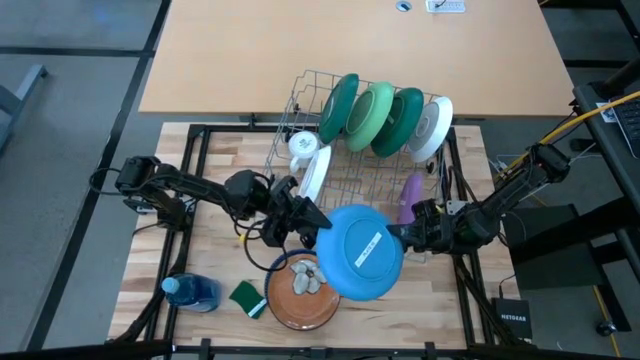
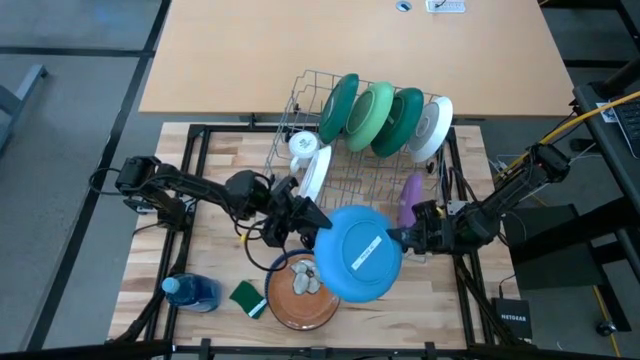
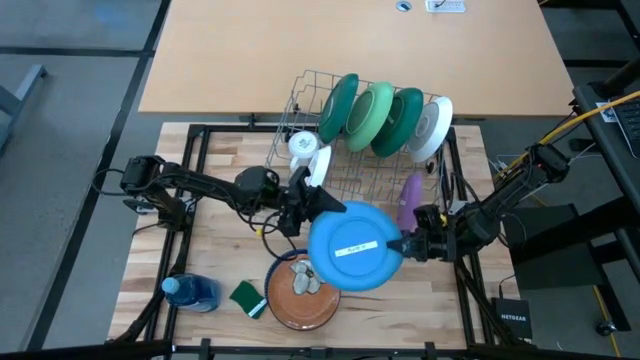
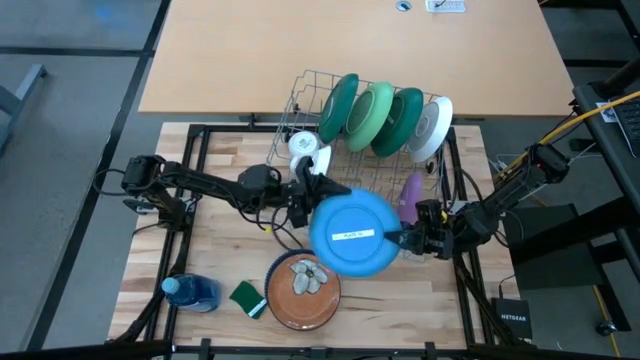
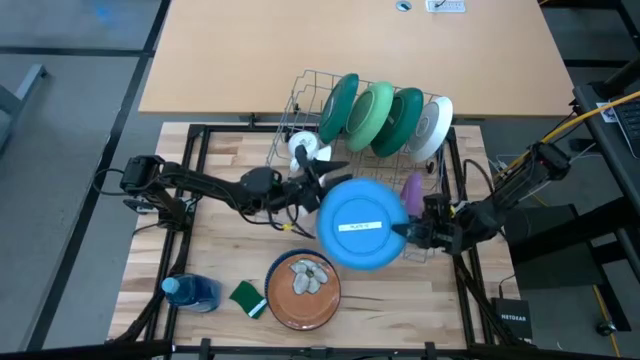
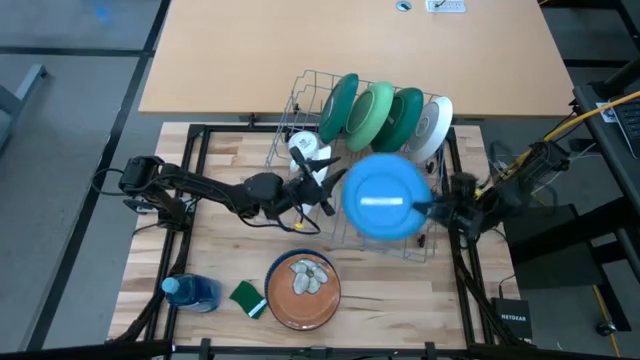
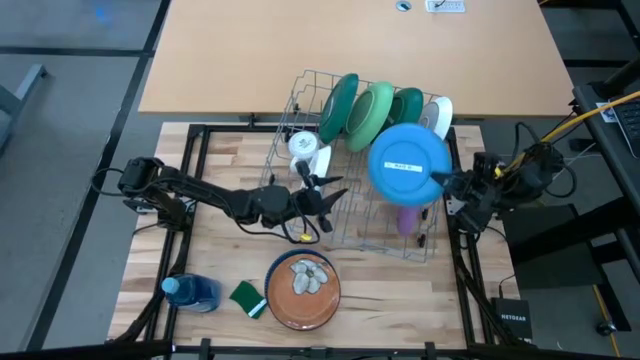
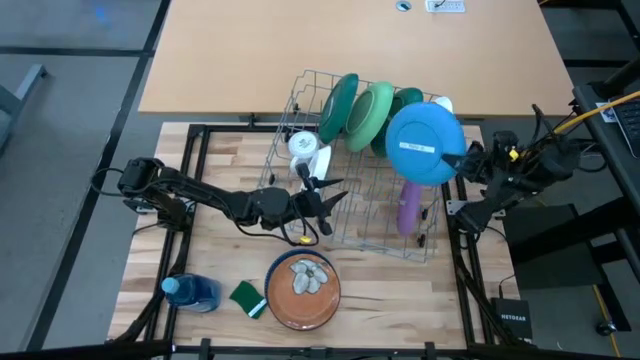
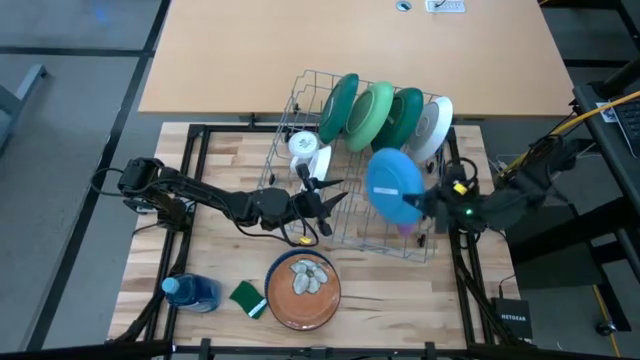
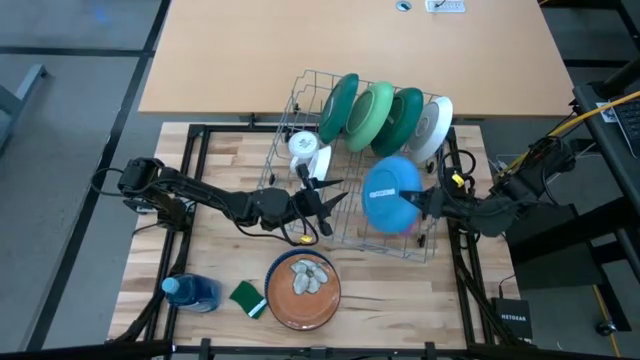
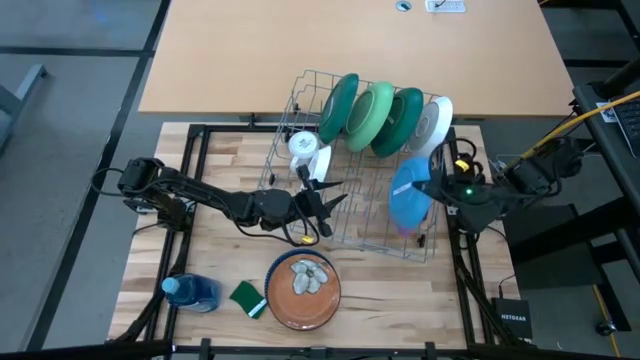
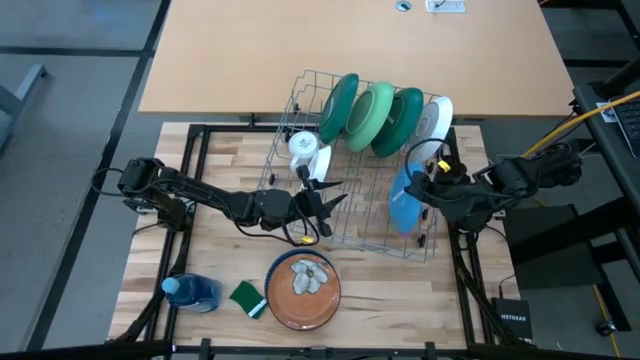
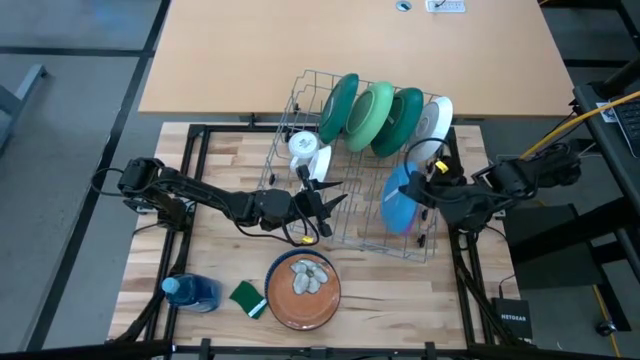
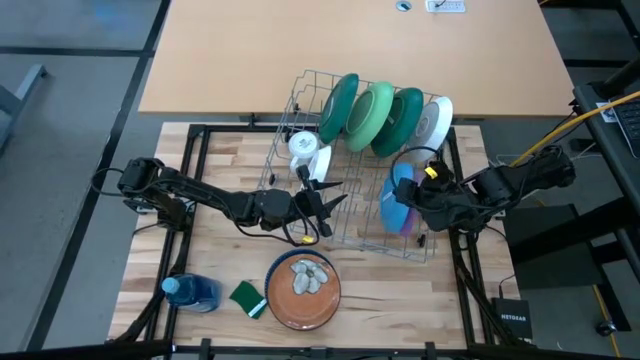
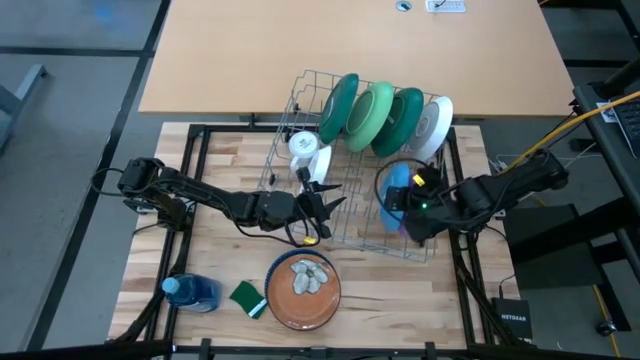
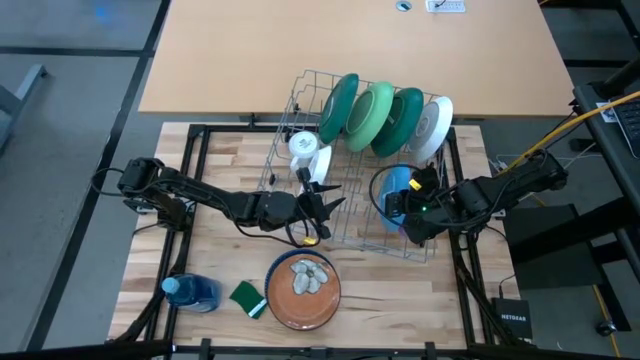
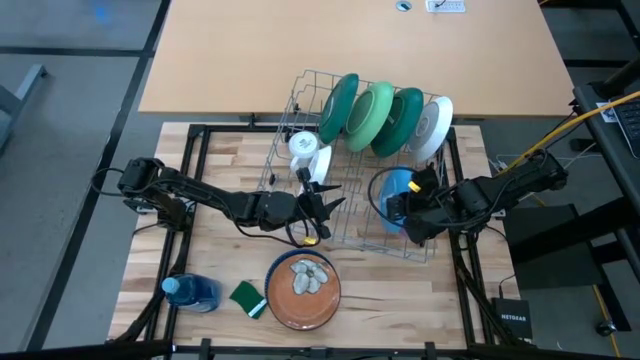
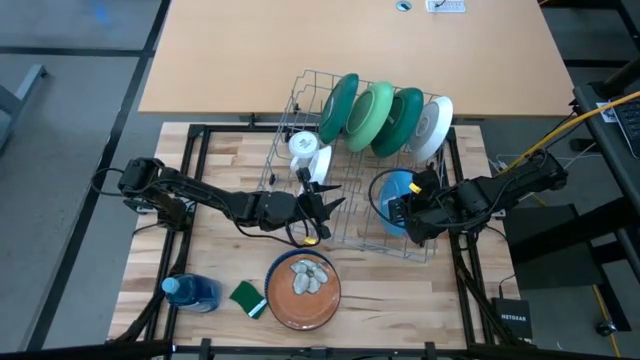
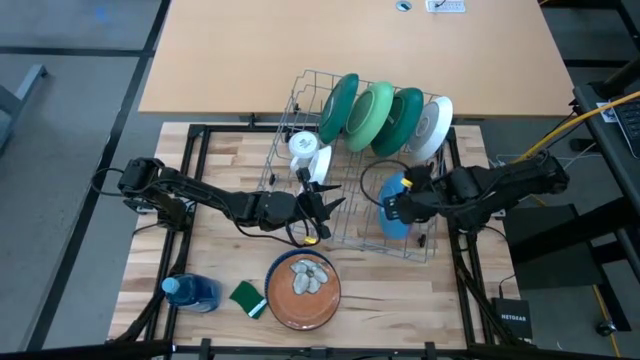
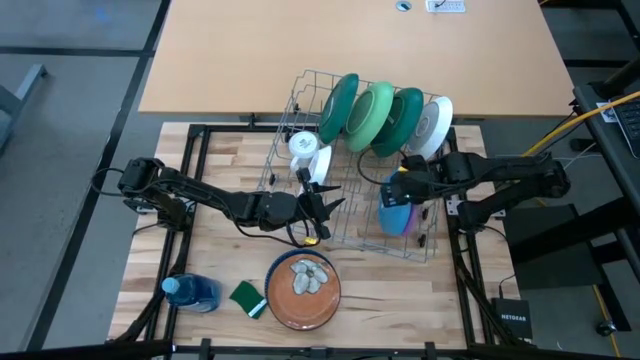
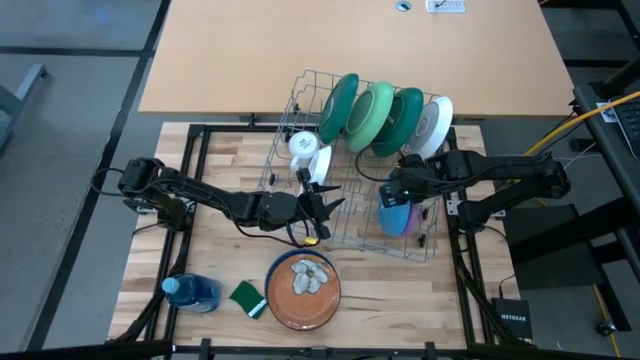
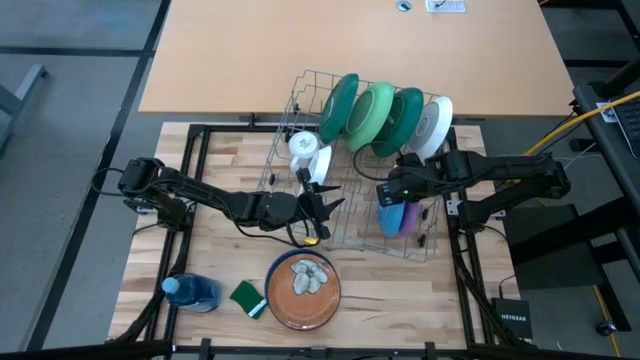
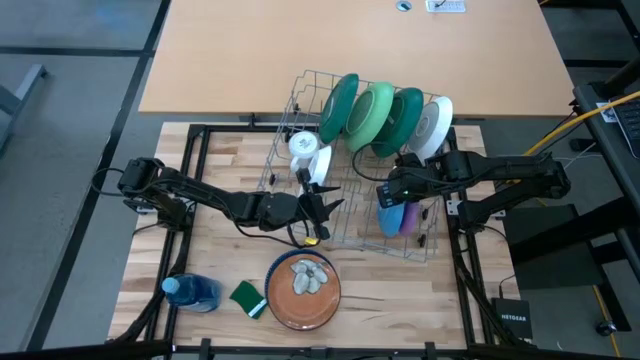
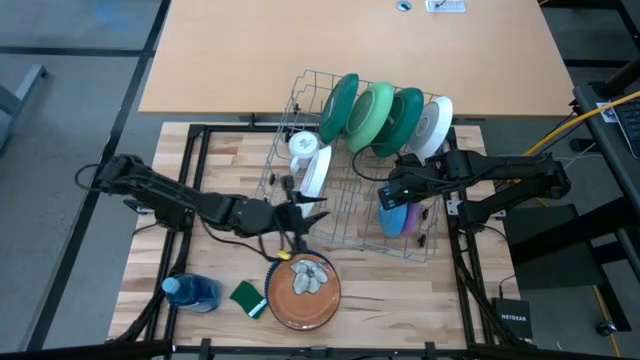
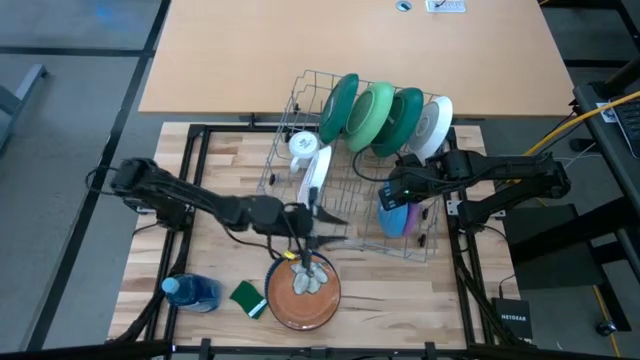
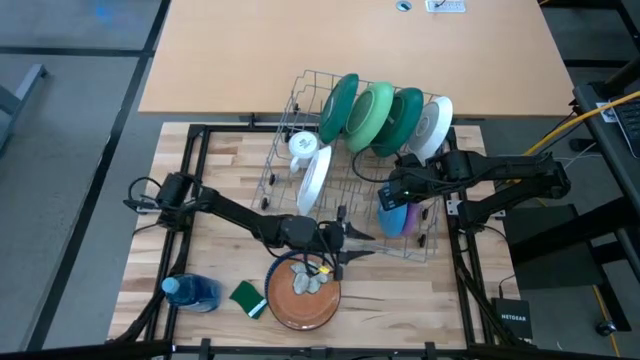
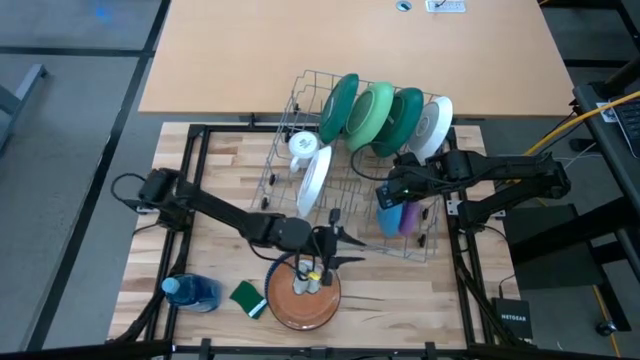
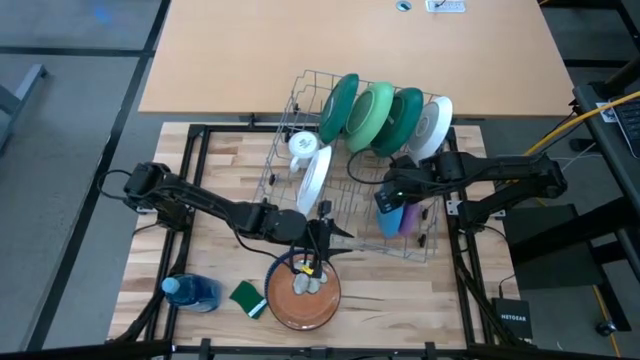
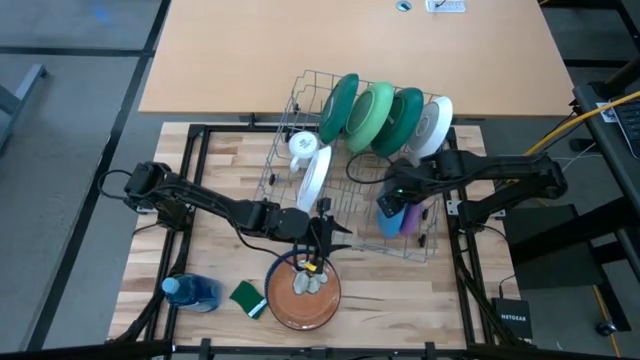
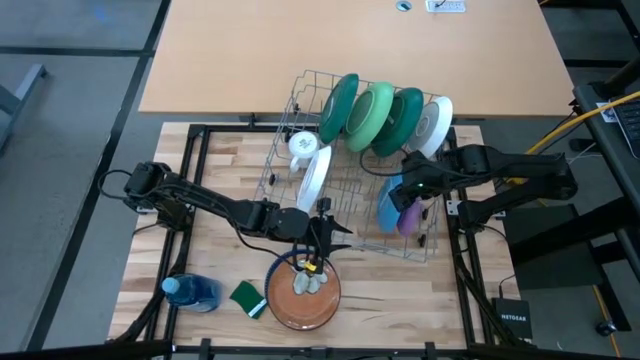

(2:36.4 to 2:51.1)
Task: Sort dishes
Put the blue in the dish rack

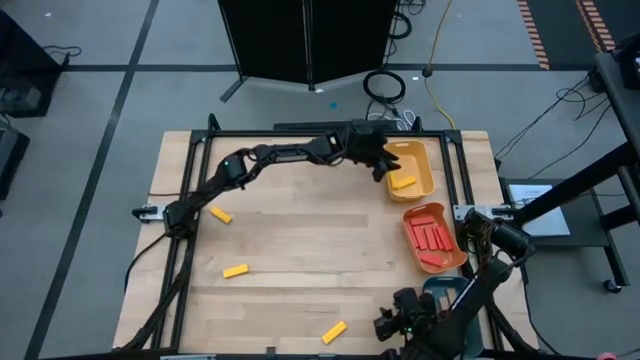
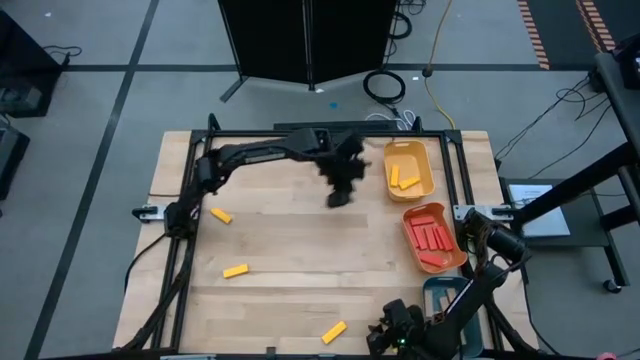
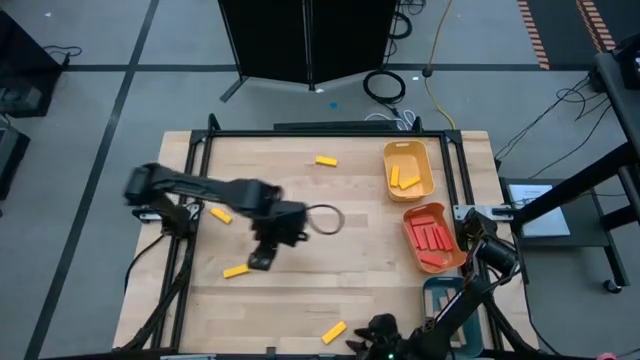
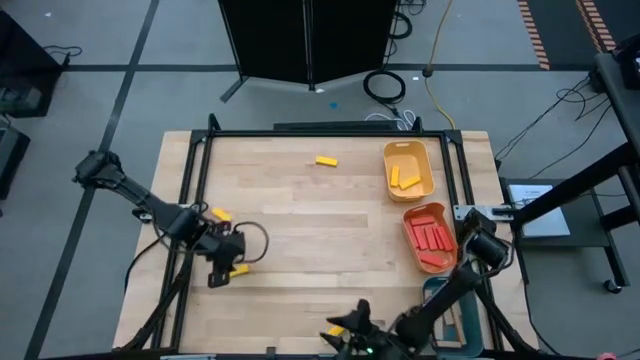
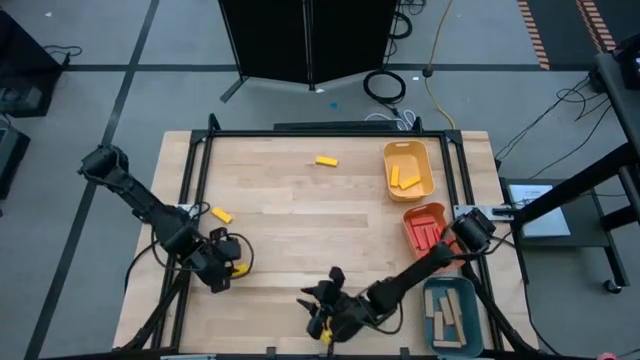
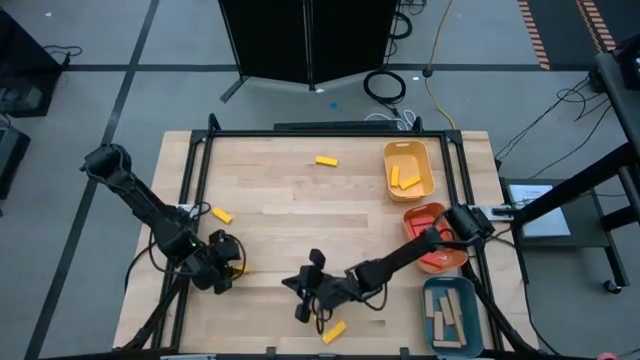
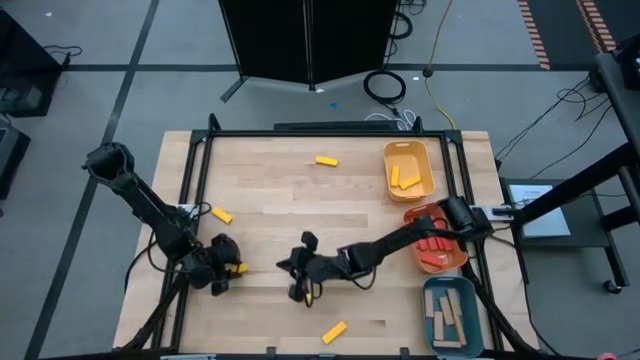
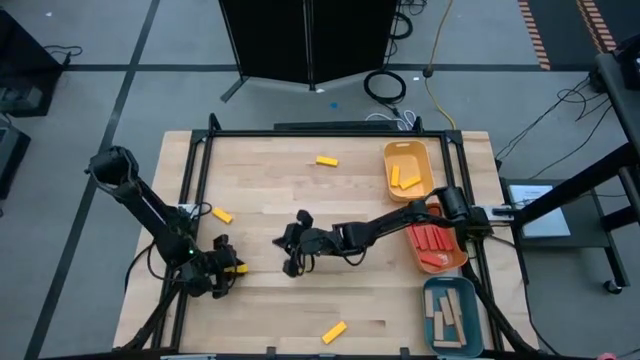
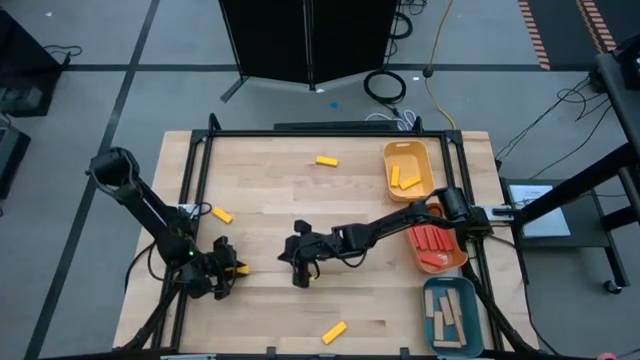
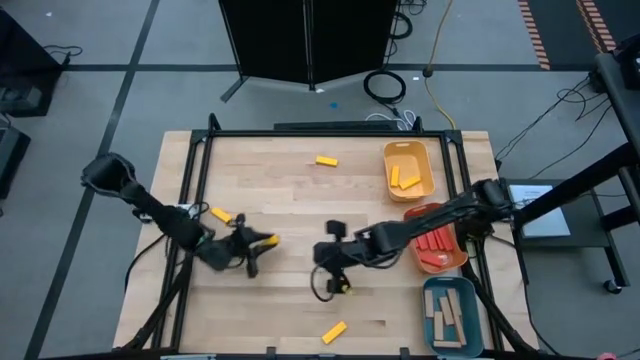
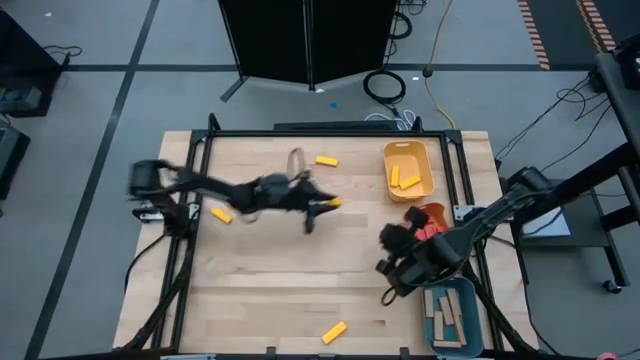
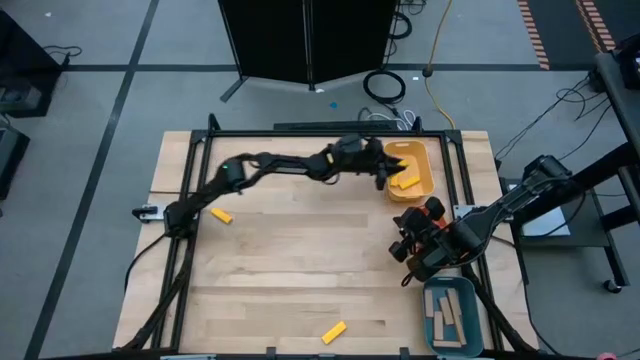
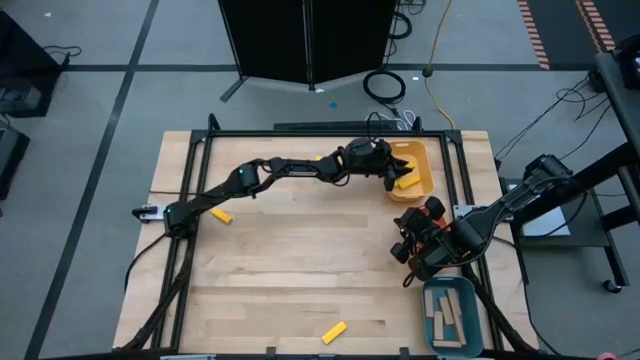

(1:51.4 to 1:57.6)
Task: Sort blocks
Put the yellow block into the yellow bin
